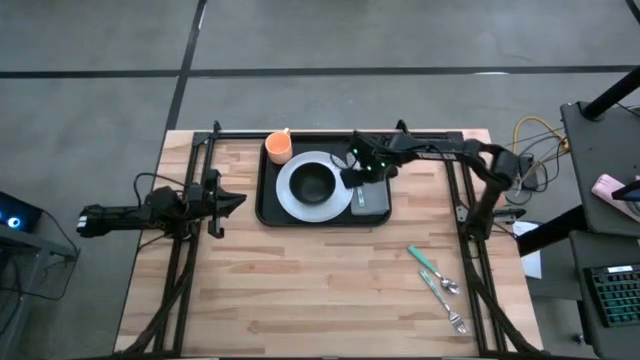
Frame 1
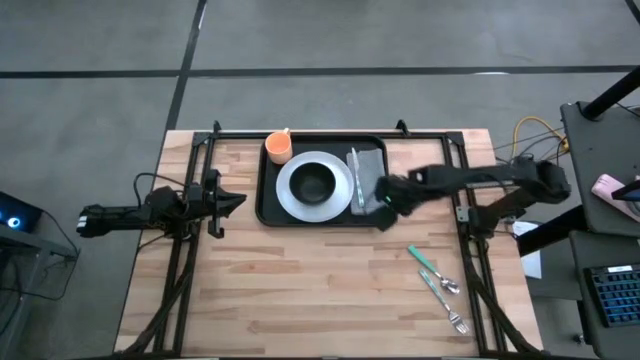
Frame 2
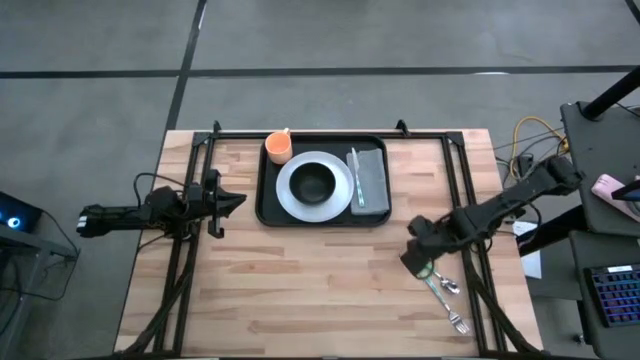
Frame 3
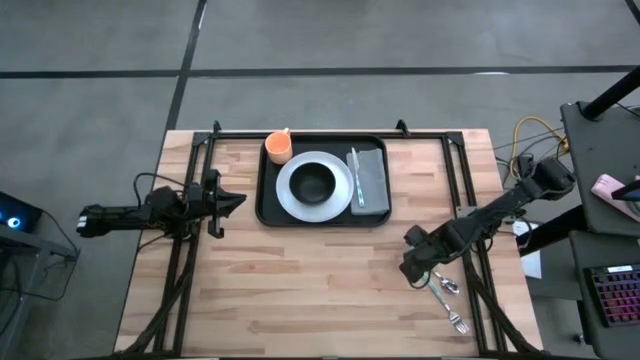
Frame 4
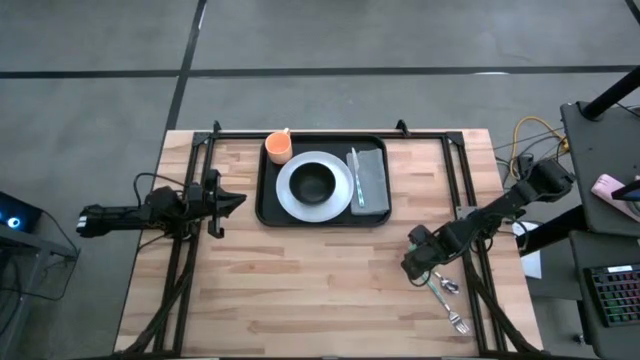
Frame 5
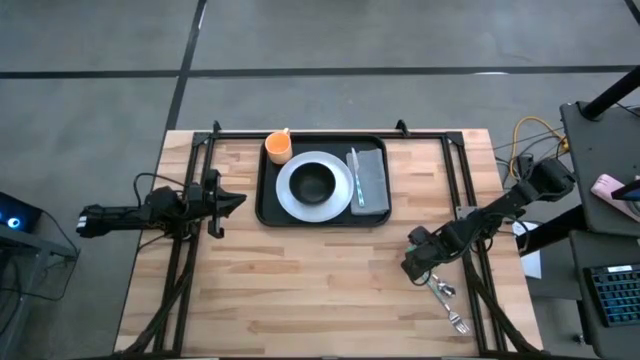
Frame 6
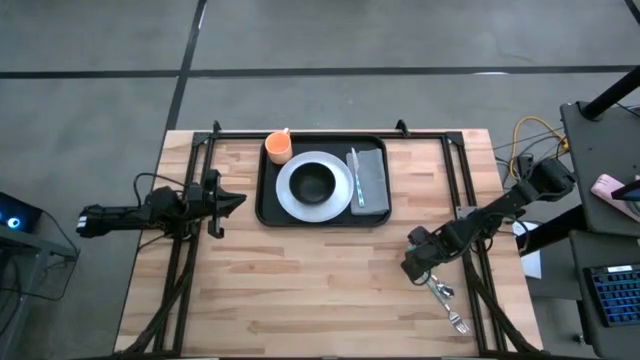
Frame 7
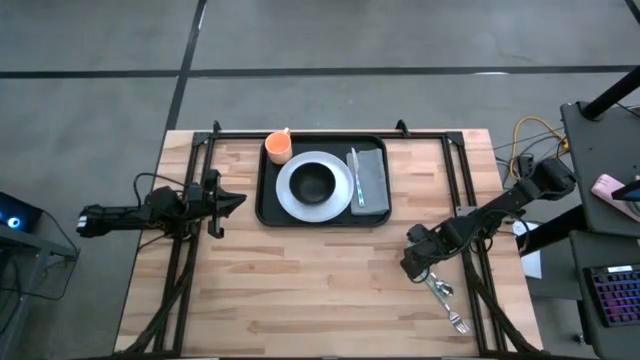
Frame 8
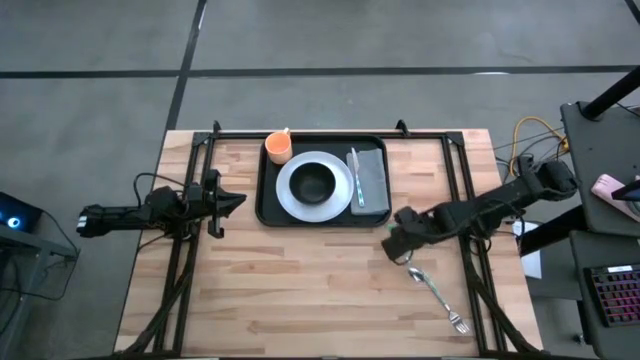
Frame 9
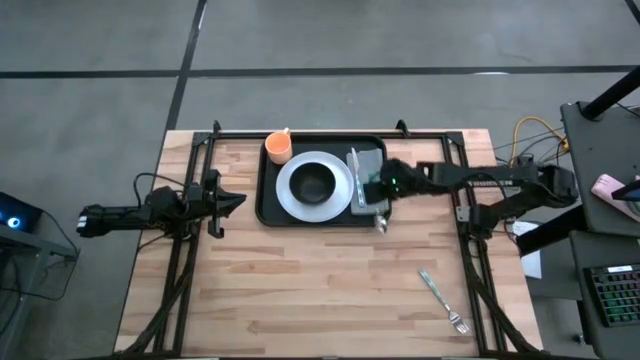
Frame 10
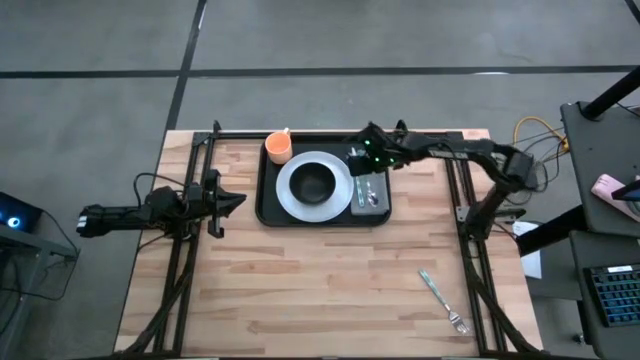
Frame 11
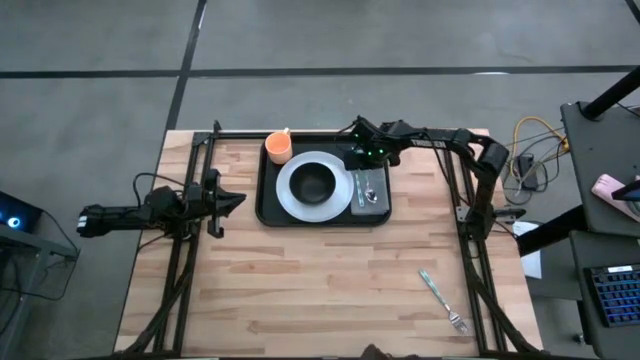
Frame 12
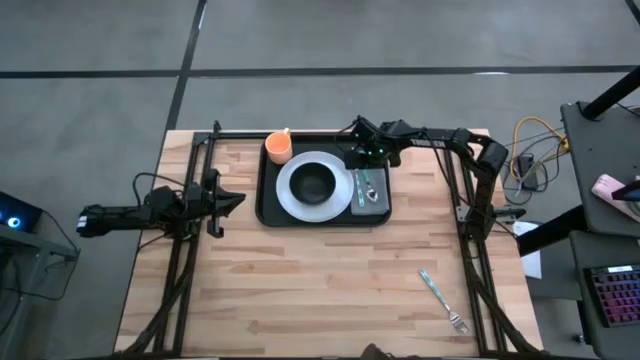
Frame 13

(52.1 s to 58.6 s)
Task: Set up tray
Put the green spoon on the gray napkin to the right of the green patterned knife

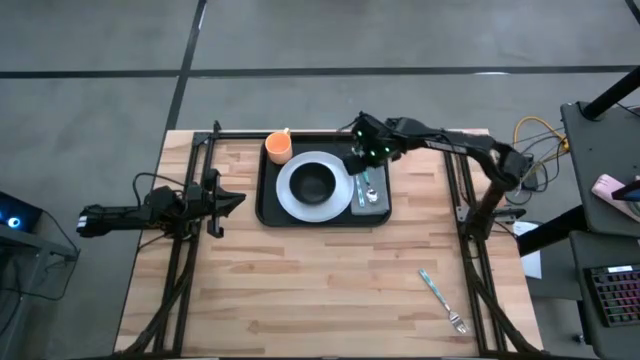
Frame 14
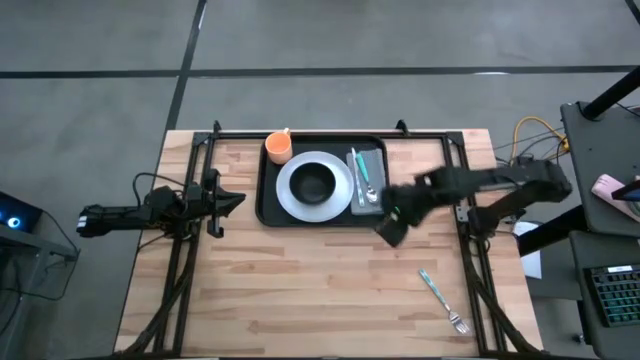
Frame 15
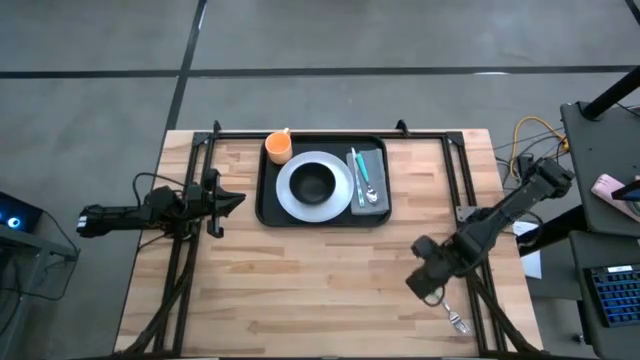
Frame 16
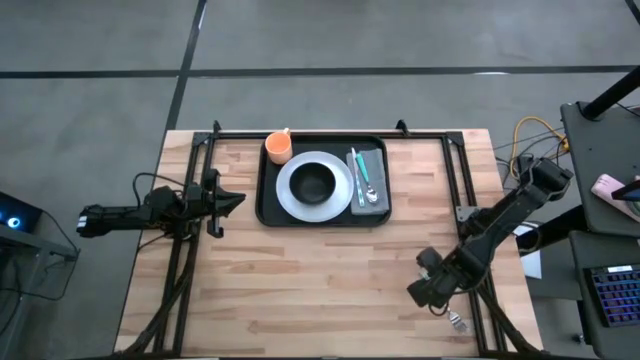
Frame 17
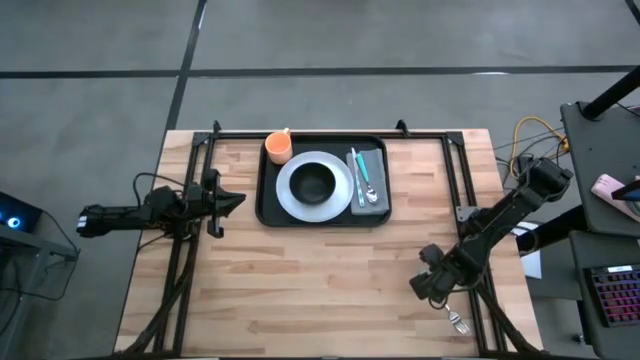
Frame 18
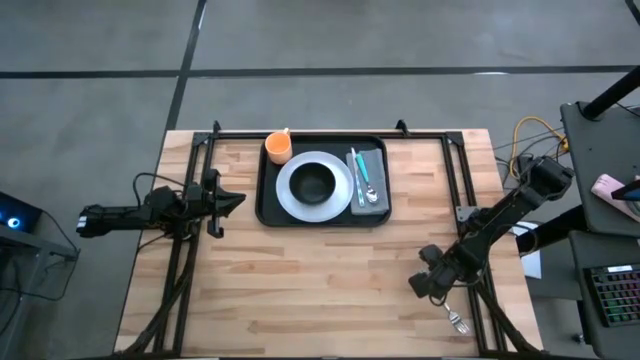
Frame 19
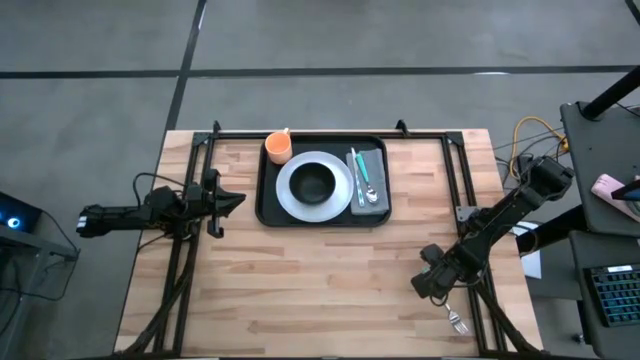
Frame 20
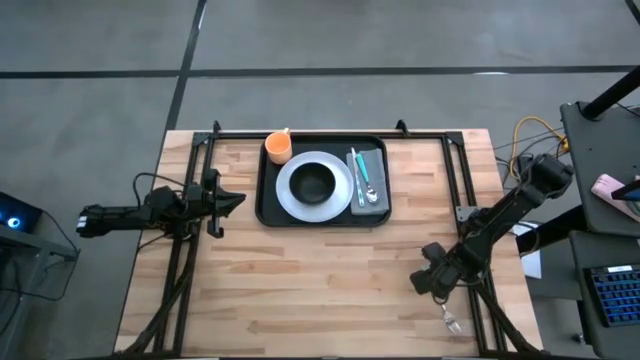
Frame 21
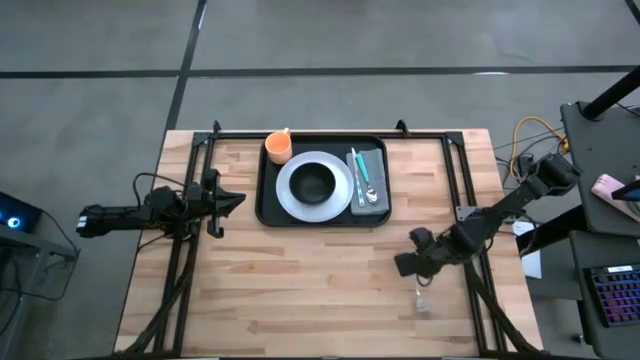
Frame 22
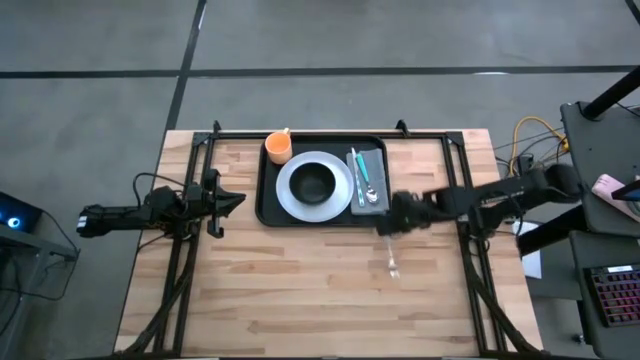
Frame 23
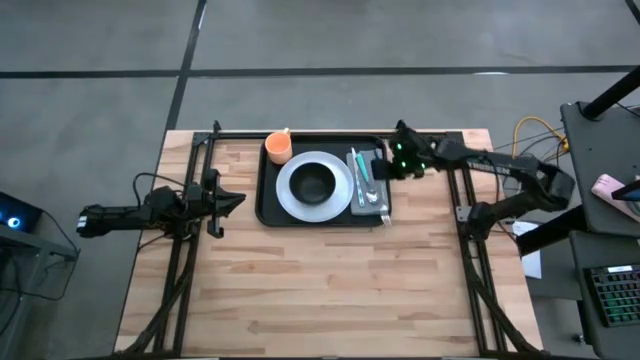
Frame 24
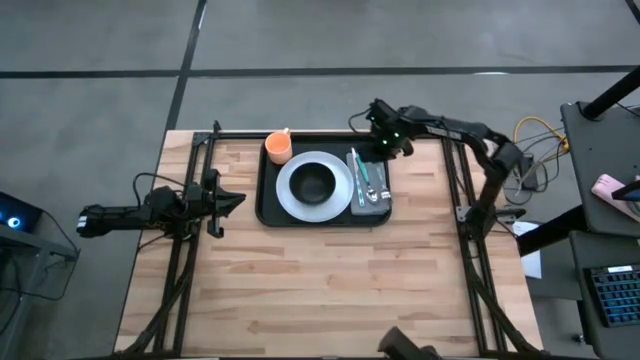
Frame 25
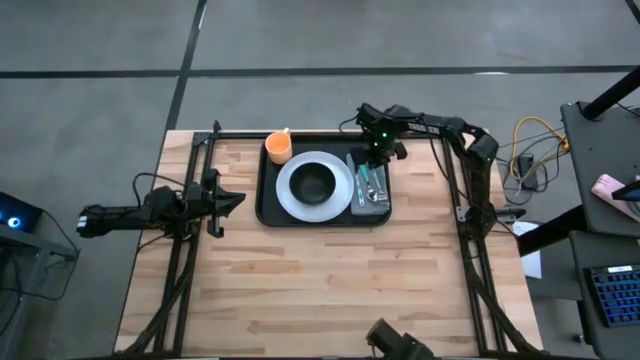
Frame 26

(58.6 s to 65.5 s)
Put the green patterned fork on the gray napkin to the right of the green spoon

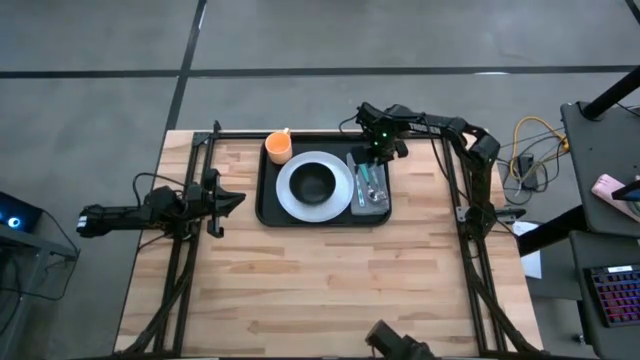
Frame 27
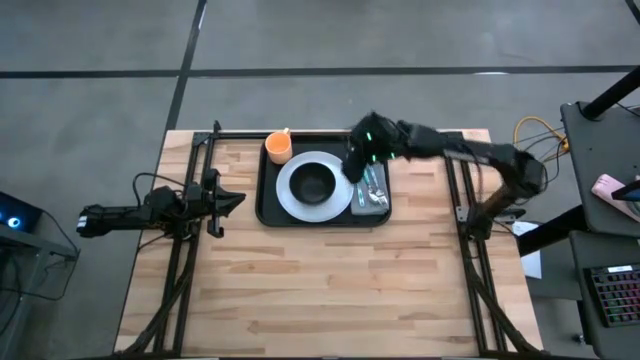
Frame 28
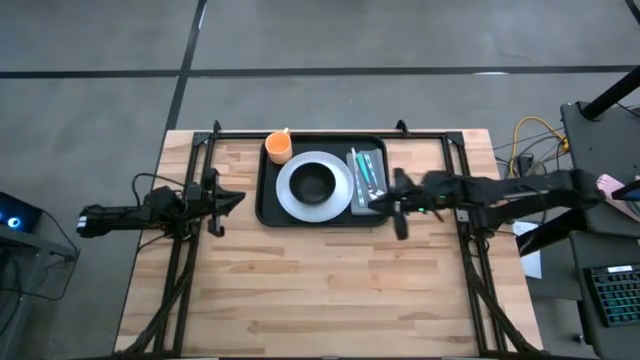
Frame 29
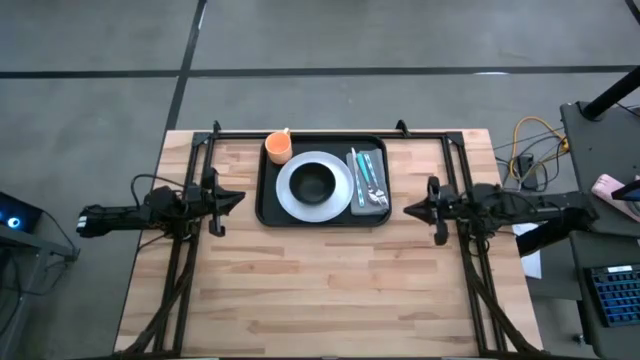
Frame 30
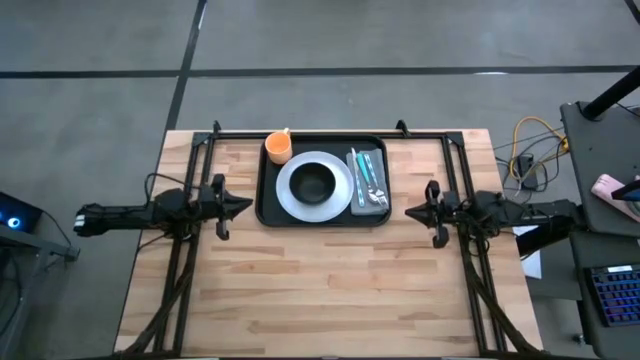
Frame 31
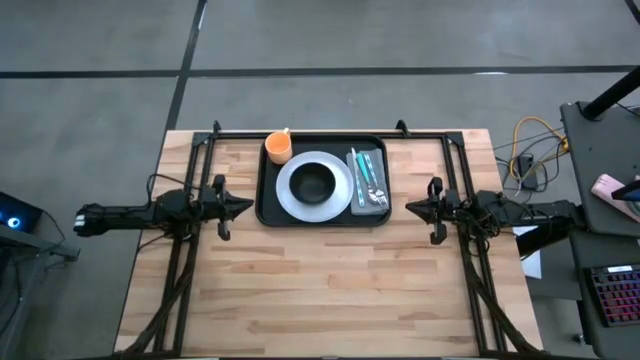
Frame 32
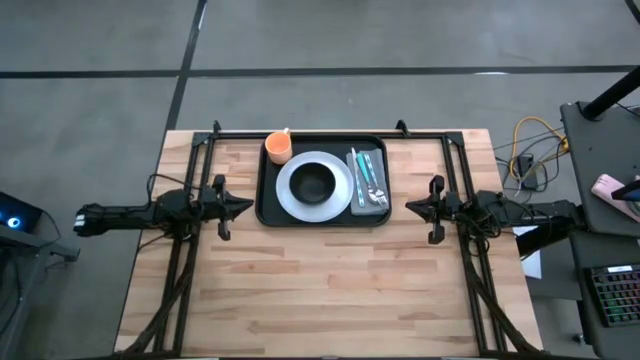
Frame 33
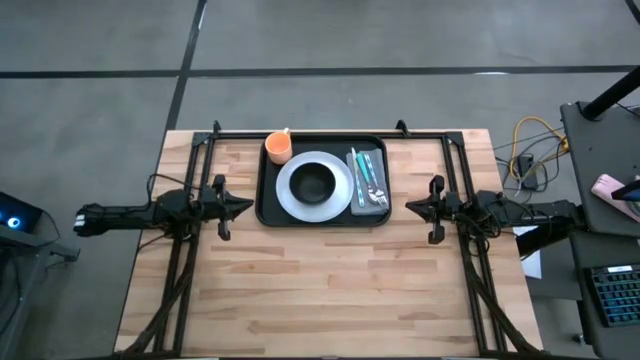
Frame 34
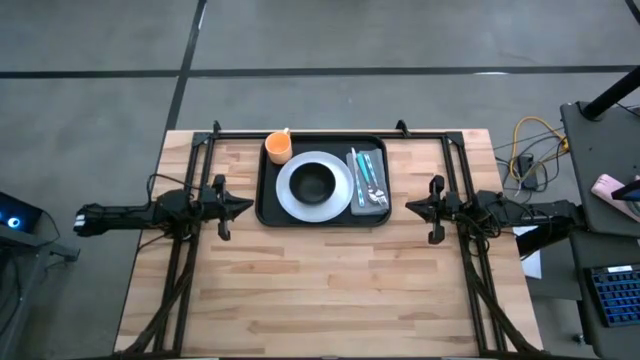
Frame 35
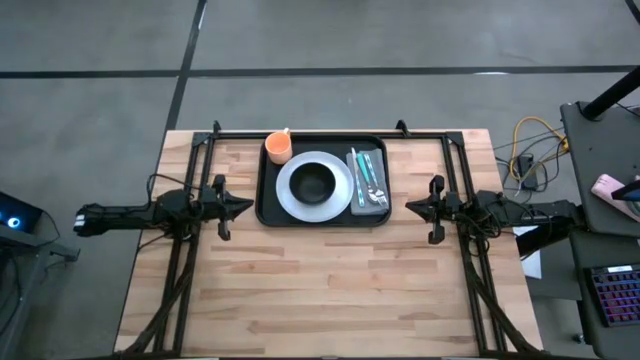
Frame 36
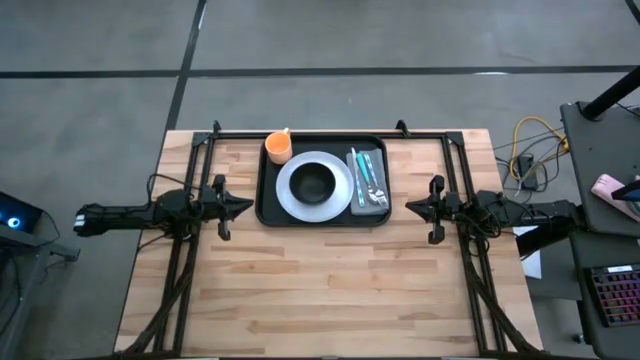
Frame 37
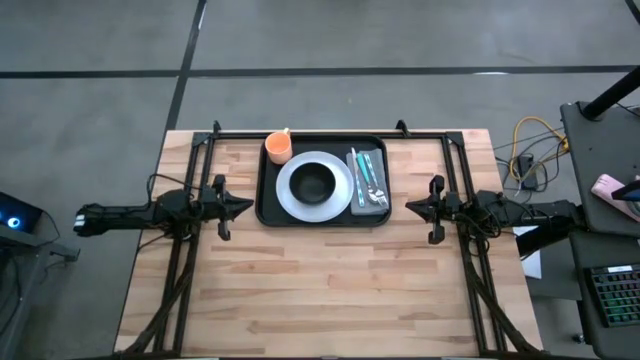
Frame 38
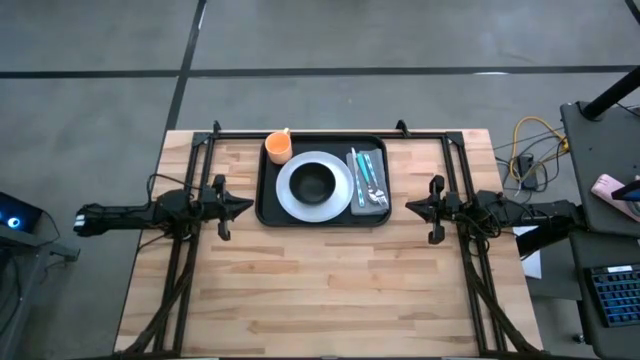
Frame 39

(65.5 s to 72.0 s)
Return to Home Position

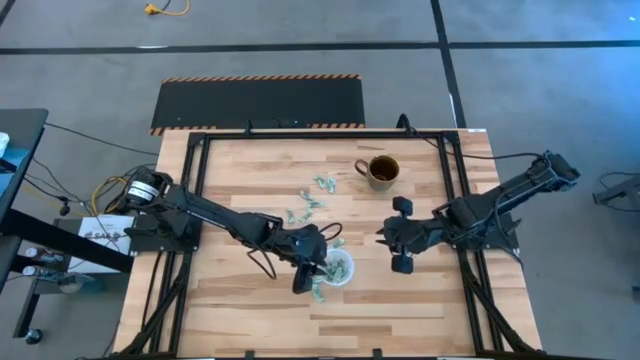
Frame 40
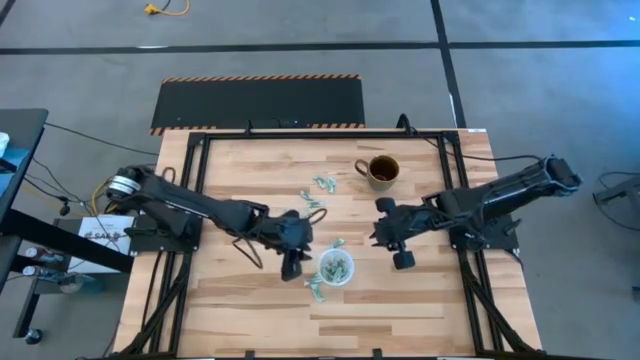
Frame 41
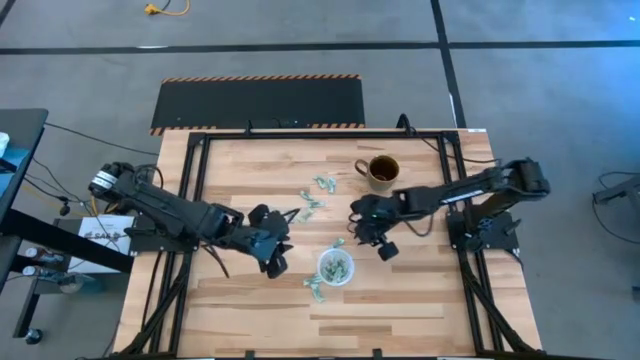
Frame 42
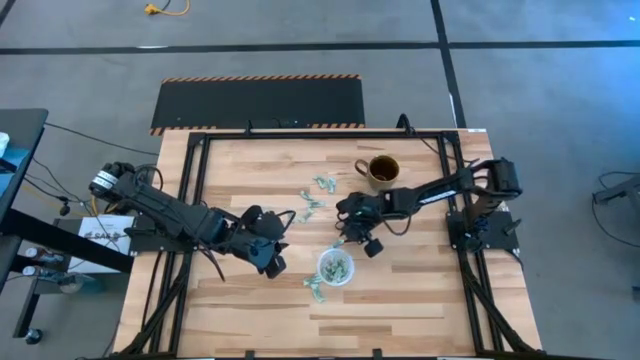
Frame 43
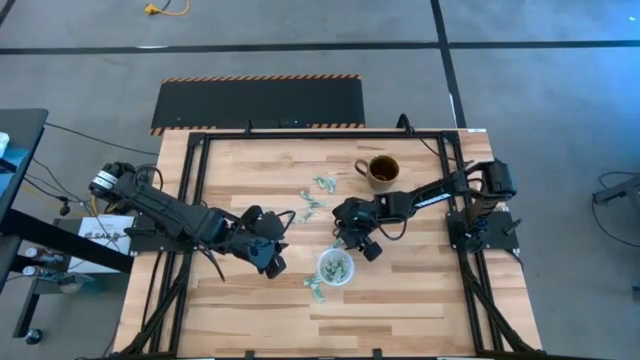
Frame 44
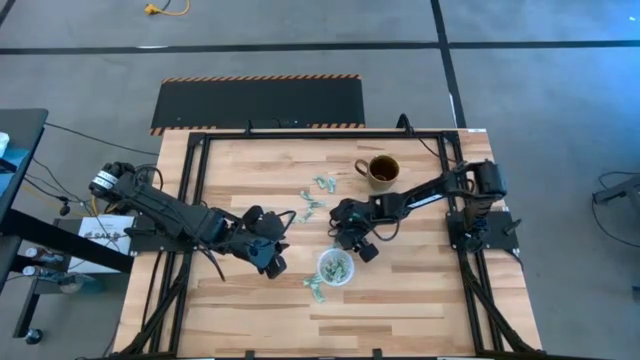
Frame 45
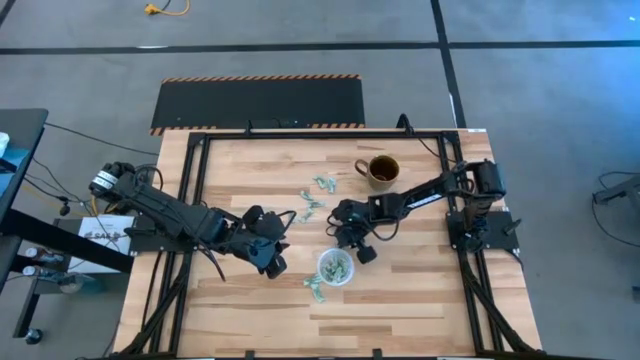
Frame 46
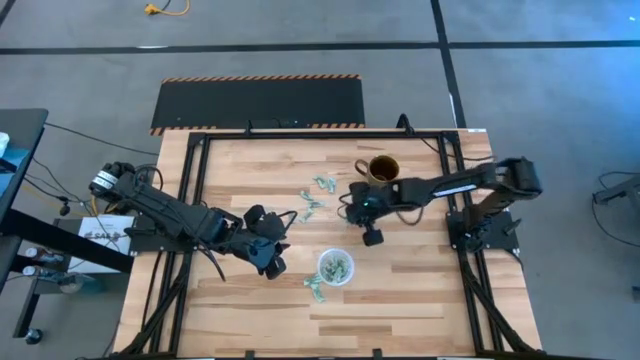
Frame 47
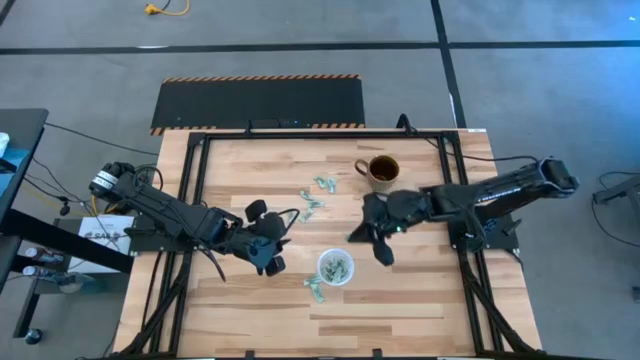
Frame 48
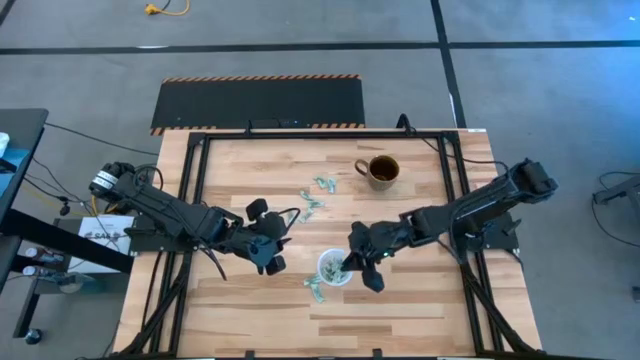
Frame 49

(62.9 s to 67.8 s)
Task: Pick and place Stevia / Truvia into bins
Put the green stevia packet into the transparent container
